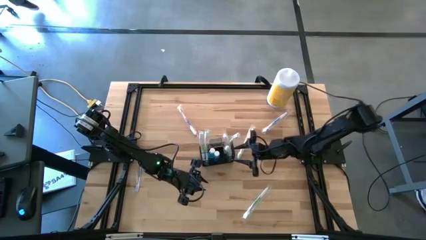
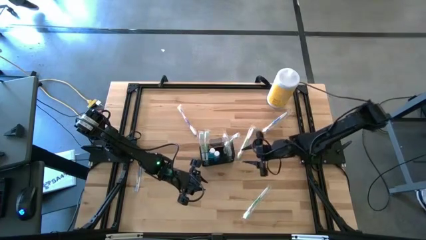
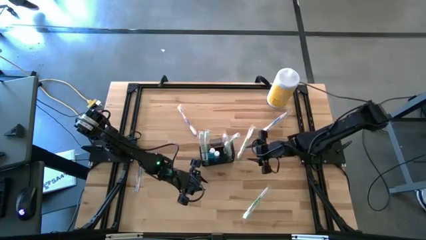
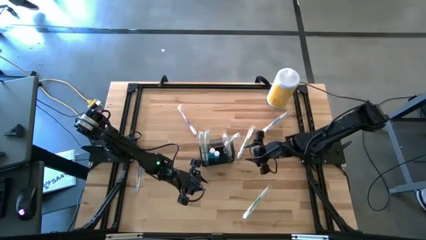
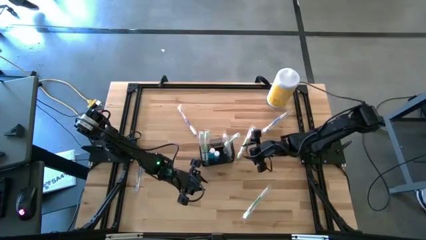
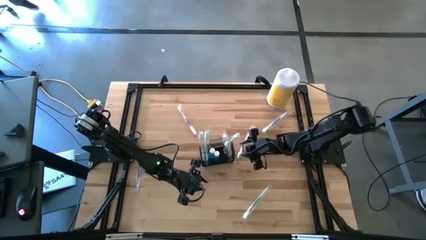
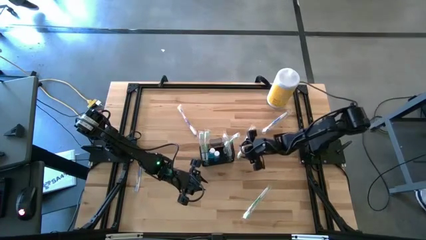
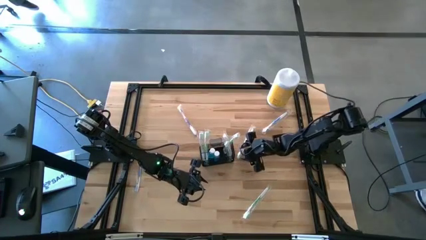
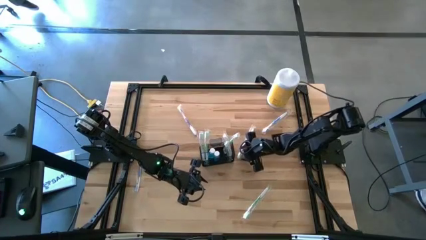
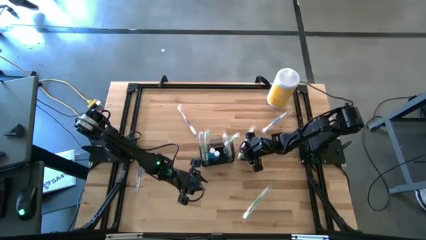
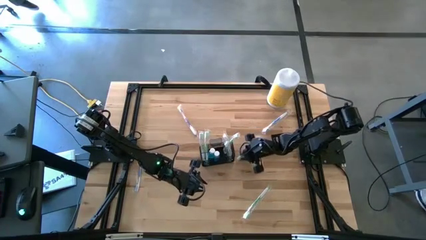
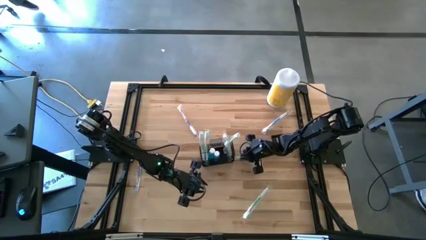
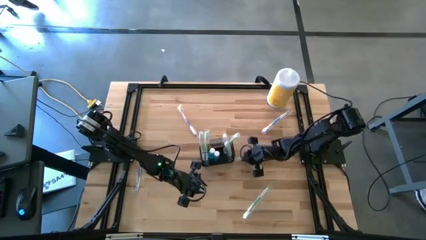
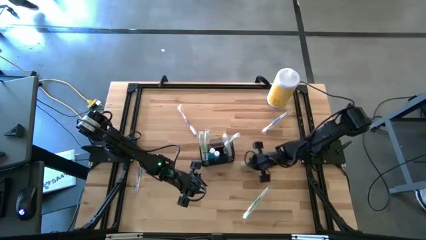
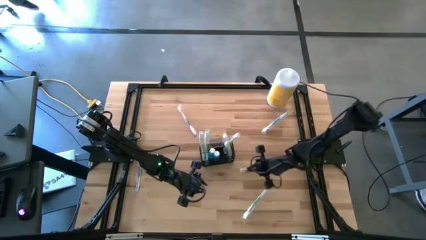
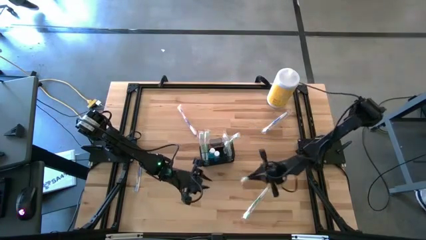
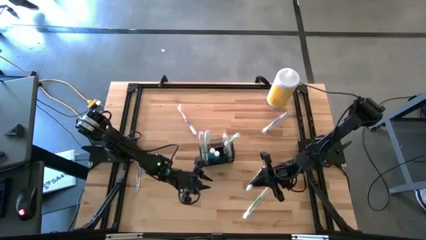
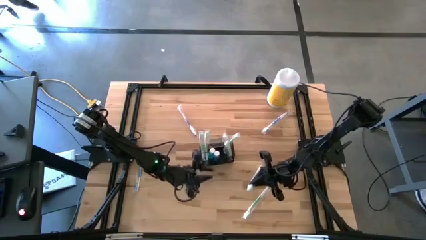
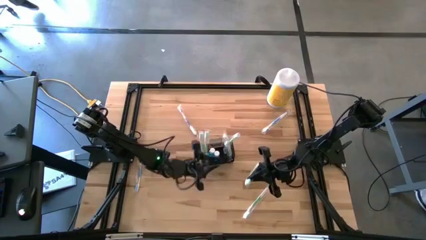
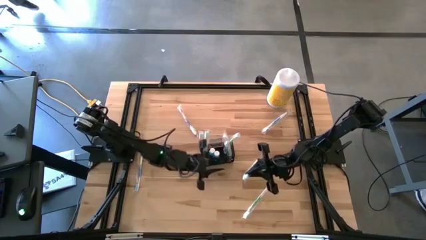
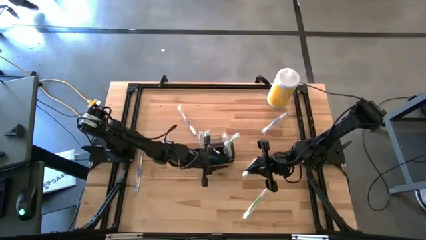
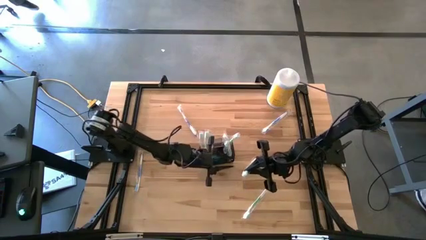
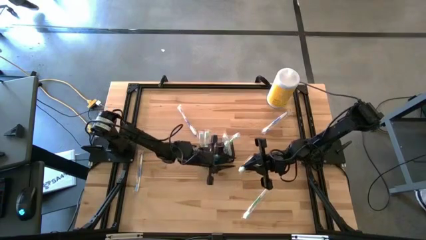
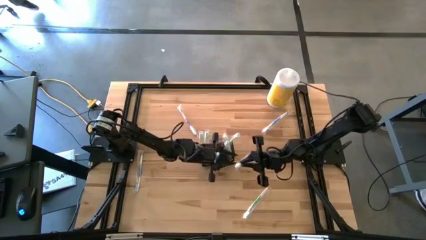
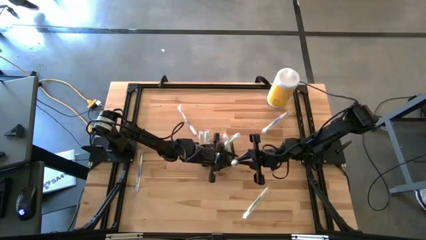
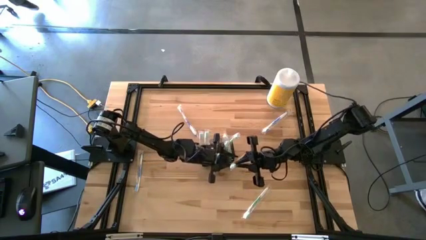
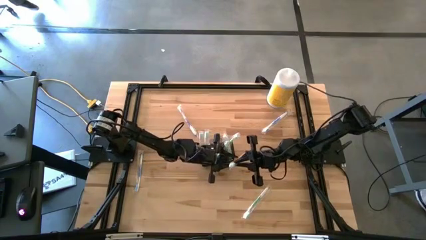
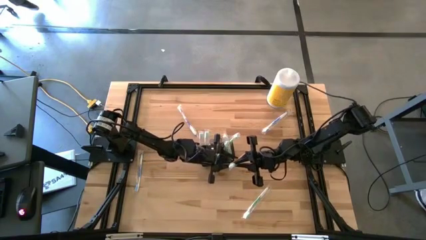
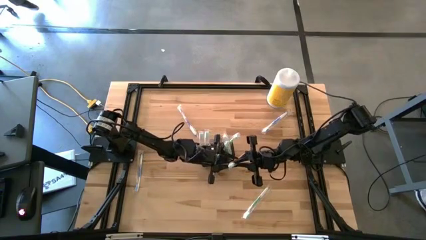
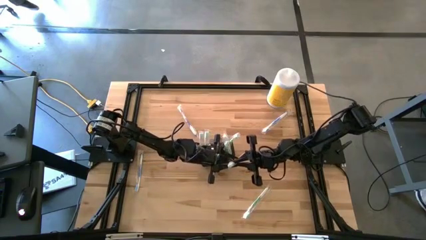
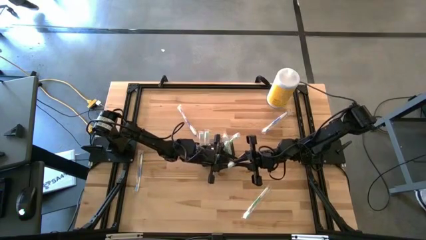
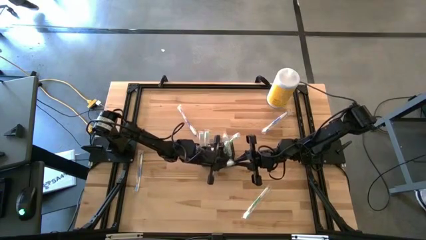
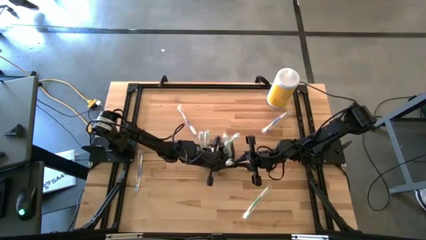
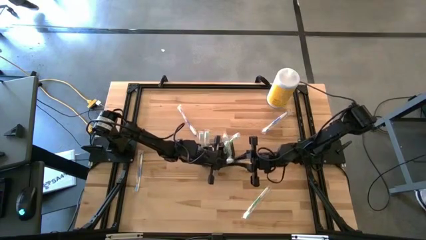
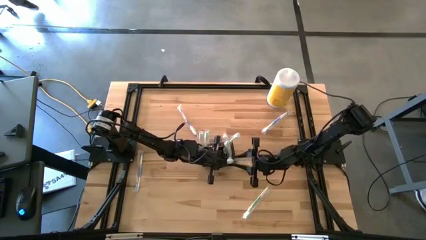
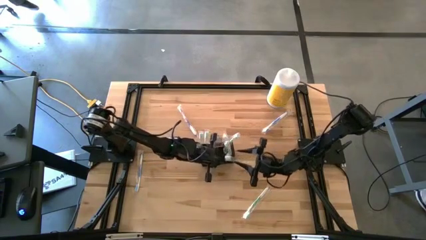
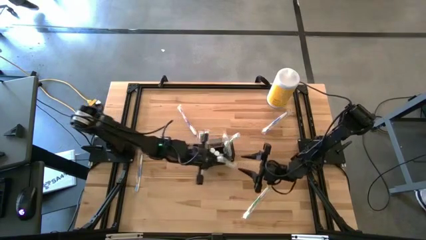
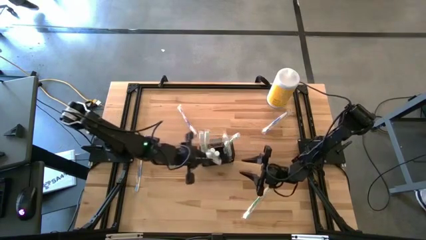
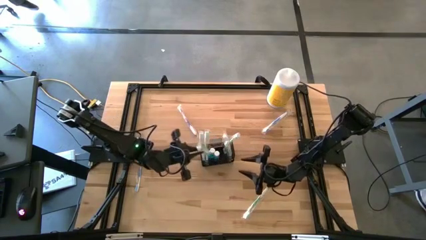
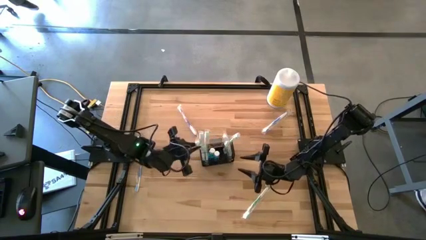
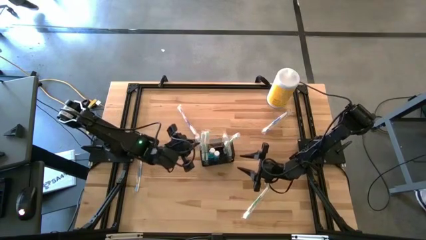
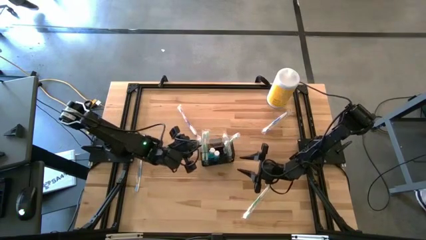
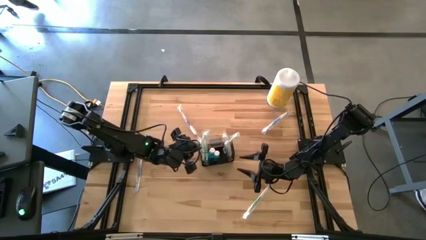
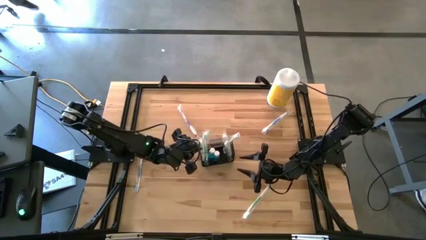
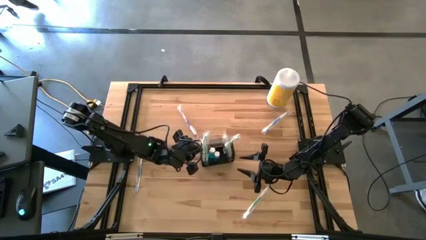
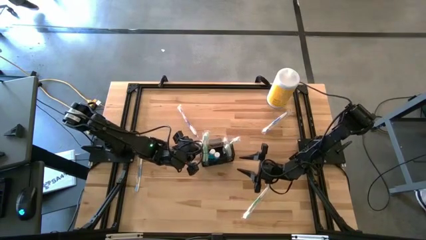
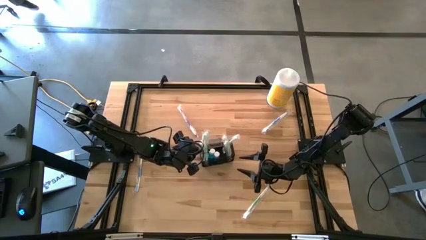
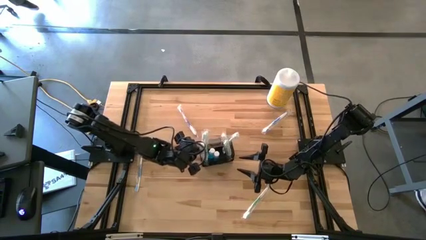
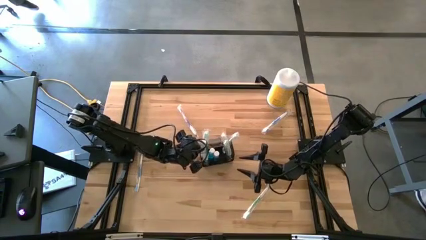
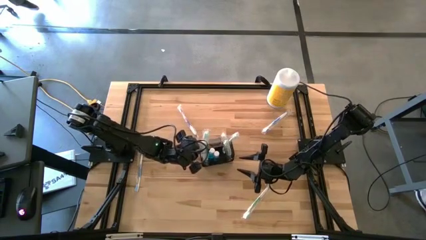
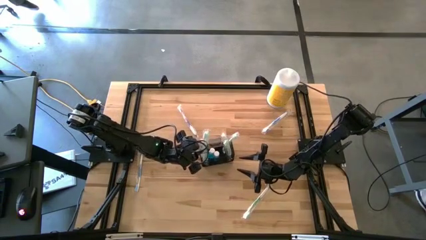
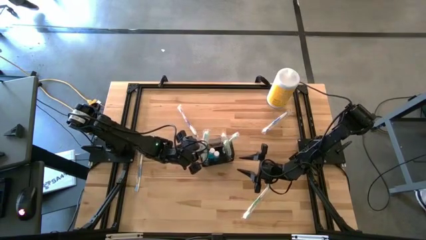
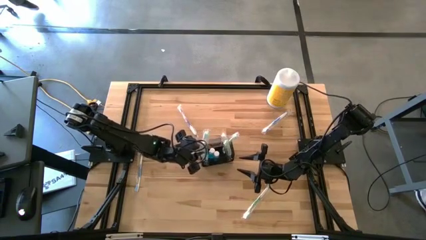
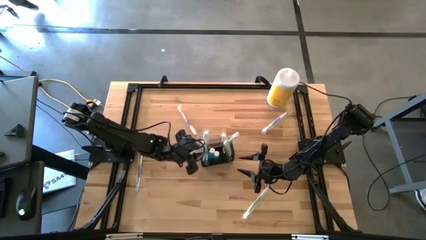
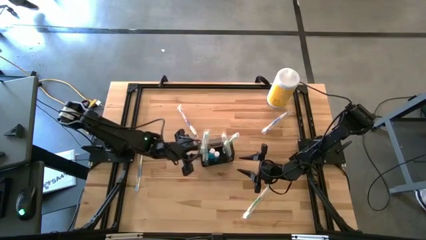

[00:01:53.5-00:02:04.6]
Task: Pick & Place toothbrushing station
Put the green toothbrush into the black mesh organizer

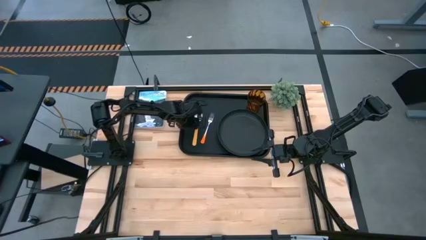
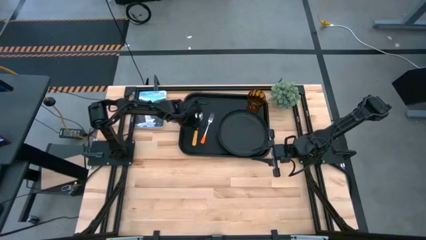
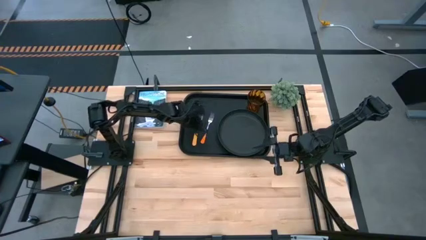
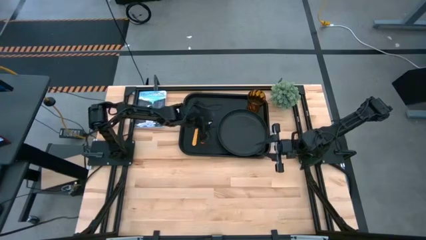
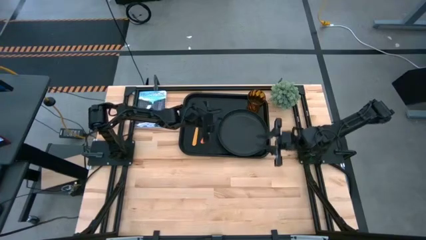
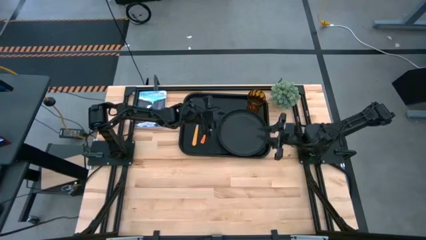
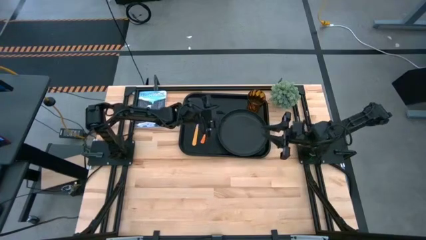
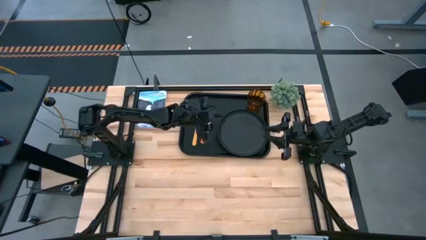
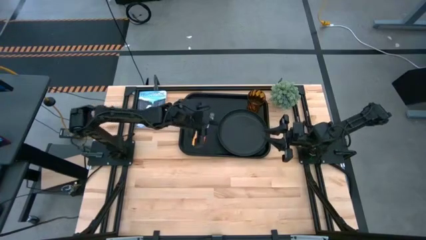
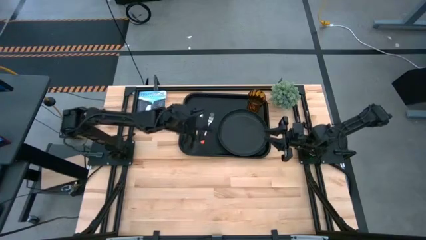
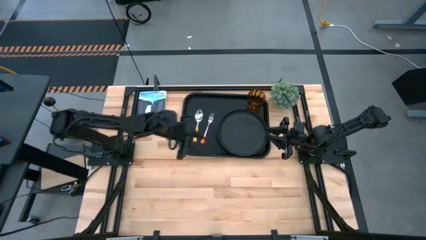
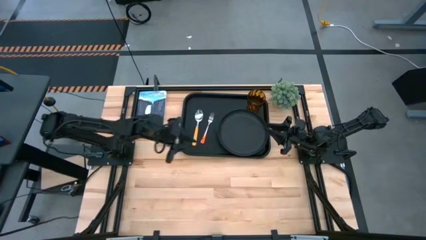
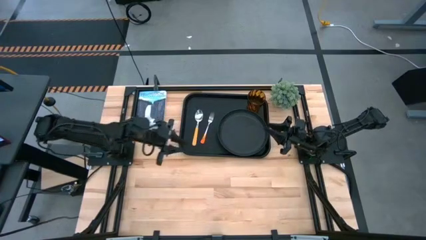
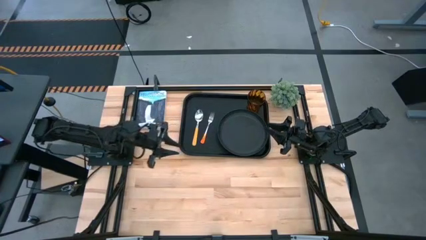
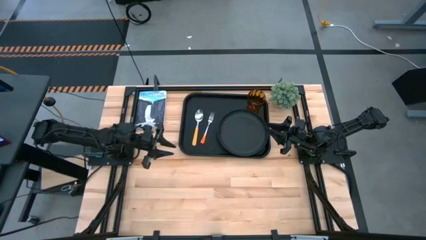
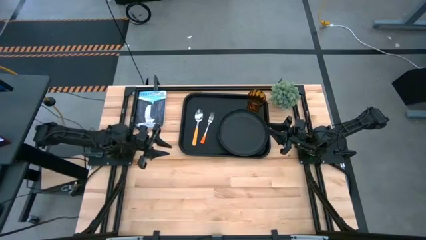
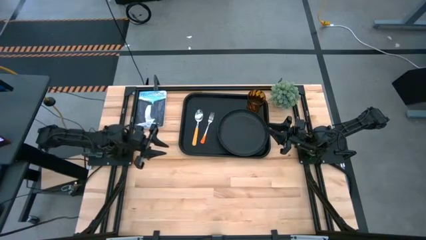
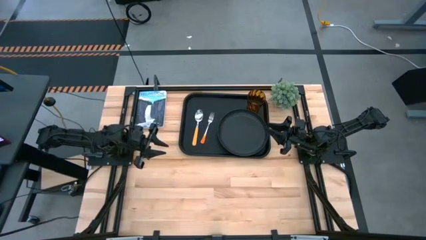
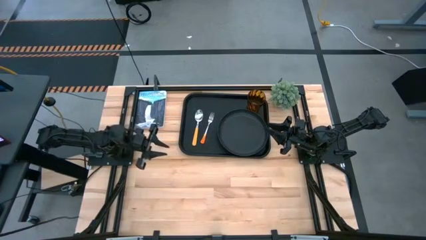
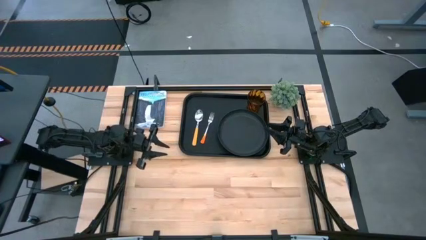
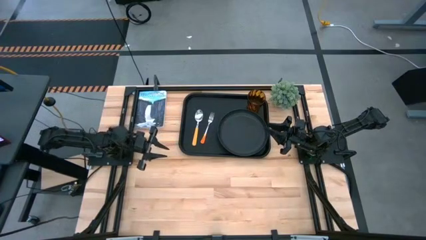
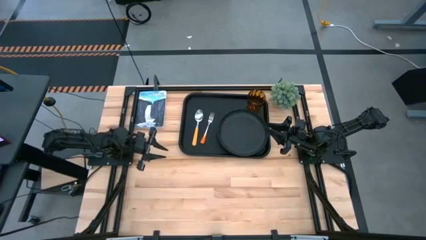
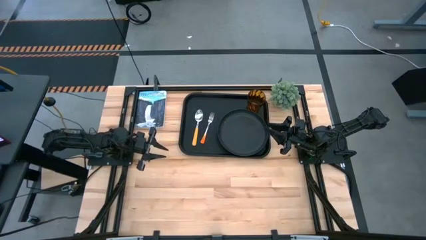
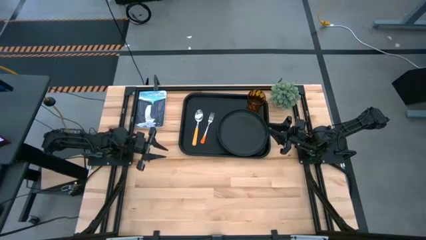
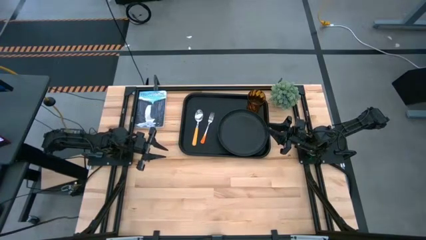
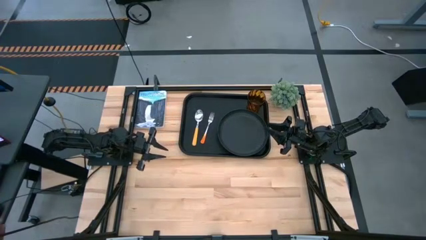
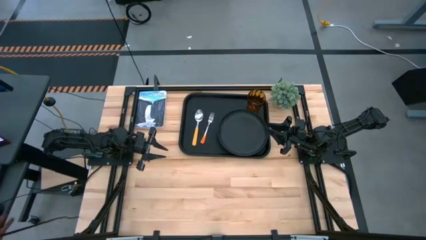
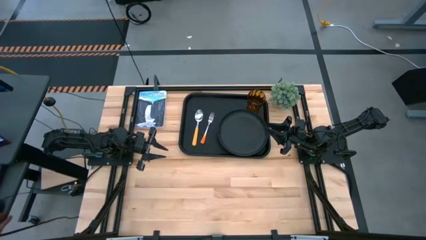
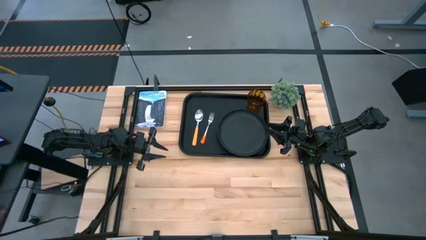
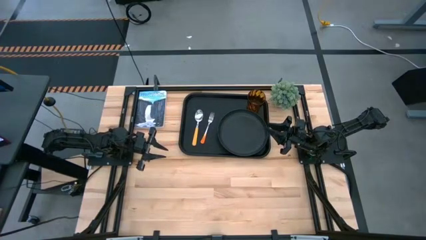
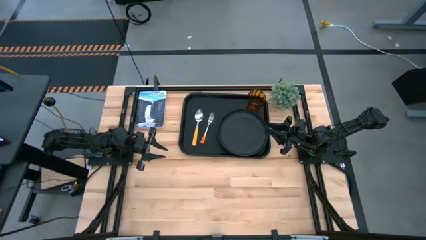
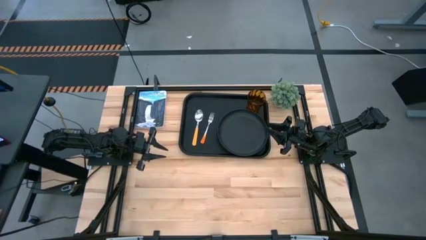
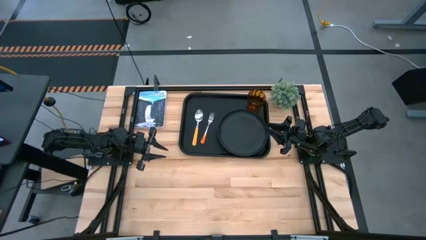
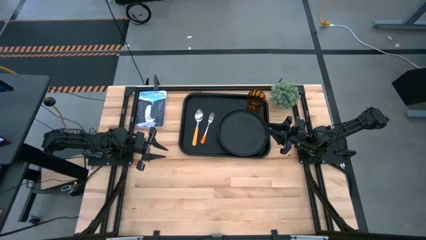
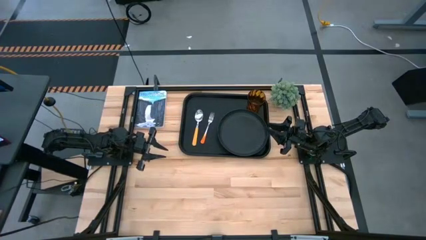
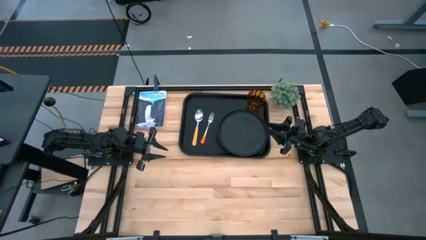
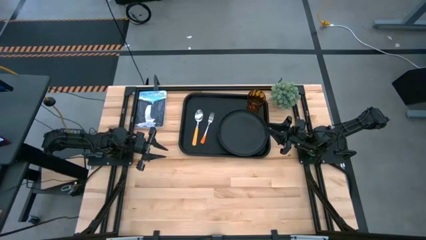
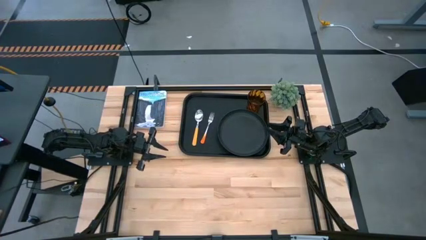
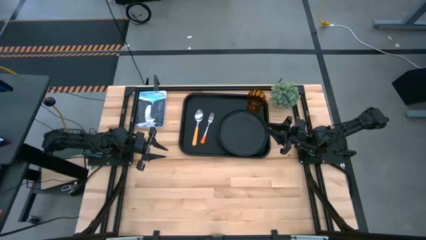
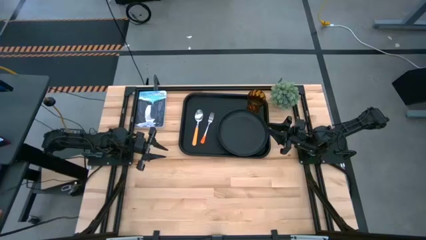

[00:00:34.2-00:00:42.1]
Task: Pick and place plate/cup/fork/spoon on tray
Return to Home Position
